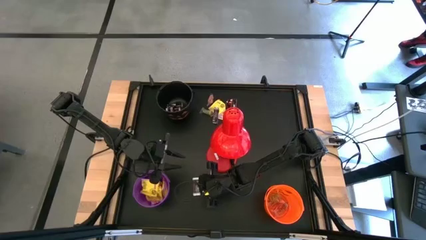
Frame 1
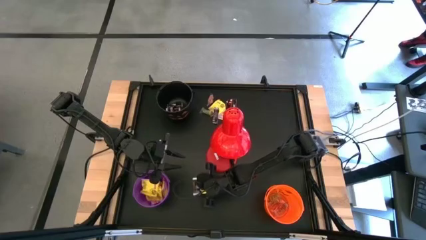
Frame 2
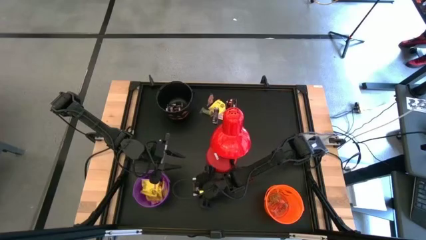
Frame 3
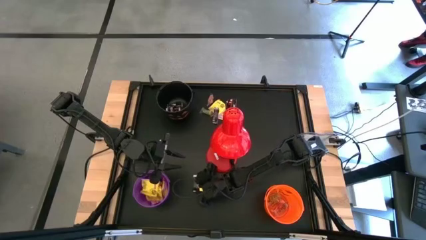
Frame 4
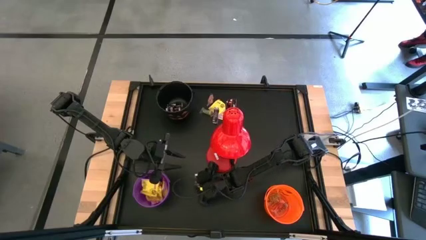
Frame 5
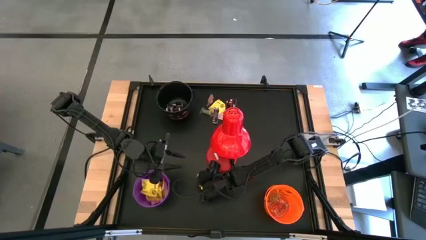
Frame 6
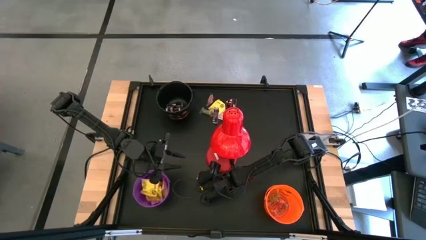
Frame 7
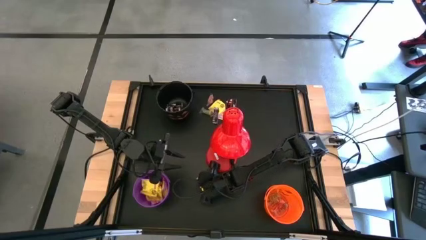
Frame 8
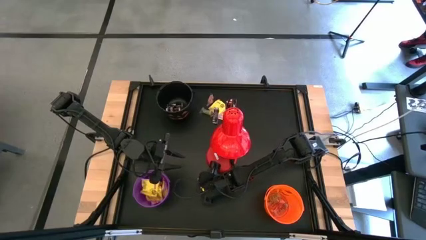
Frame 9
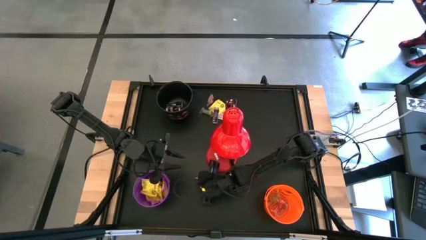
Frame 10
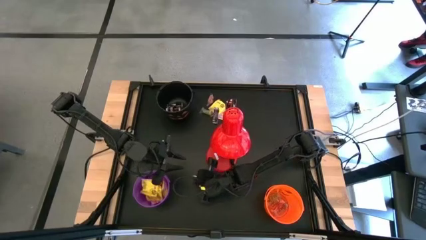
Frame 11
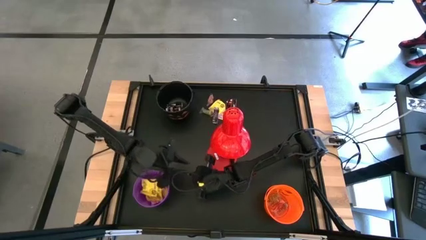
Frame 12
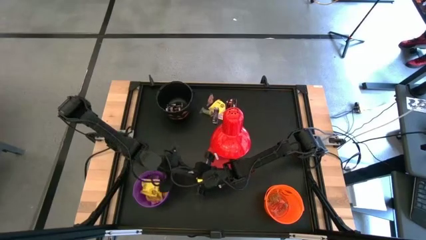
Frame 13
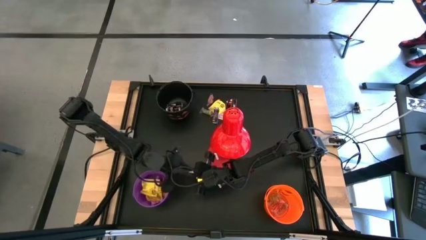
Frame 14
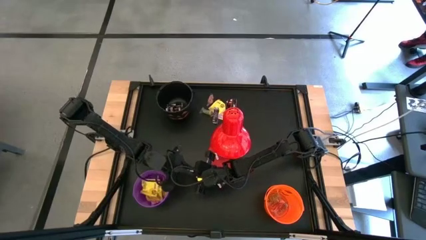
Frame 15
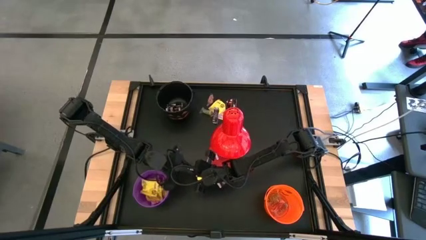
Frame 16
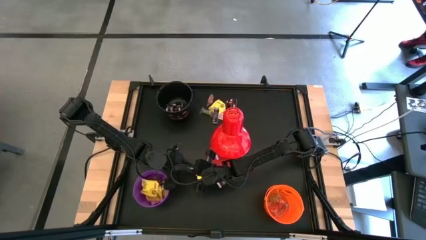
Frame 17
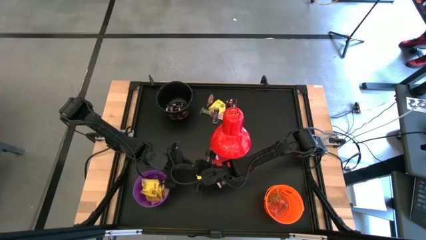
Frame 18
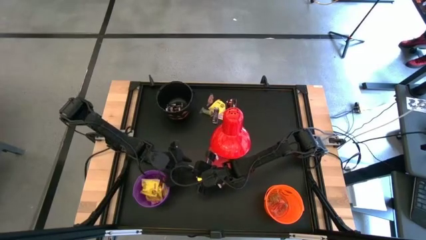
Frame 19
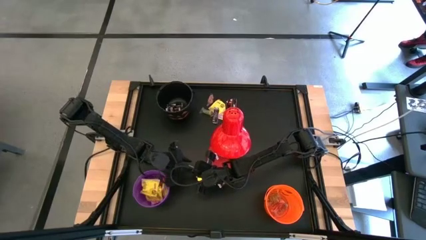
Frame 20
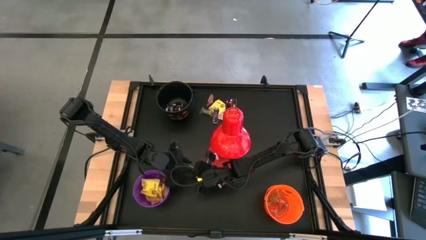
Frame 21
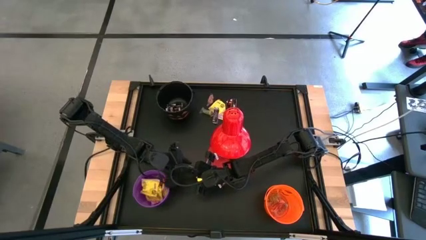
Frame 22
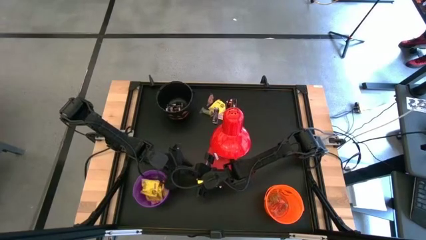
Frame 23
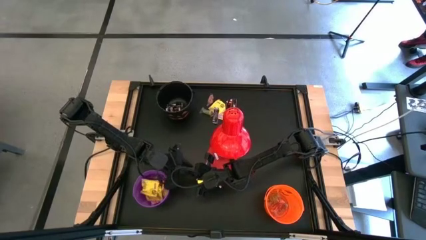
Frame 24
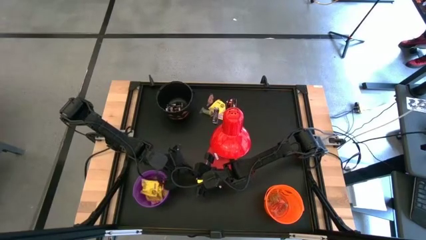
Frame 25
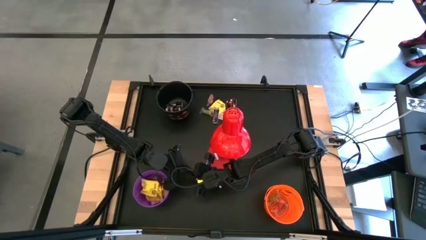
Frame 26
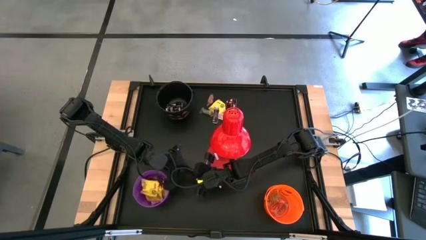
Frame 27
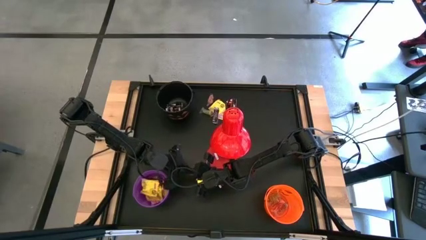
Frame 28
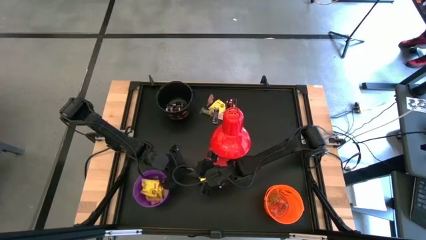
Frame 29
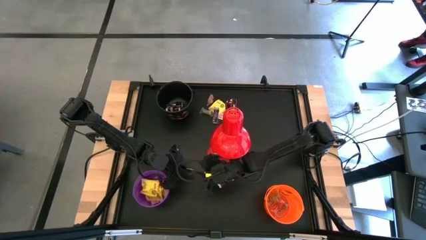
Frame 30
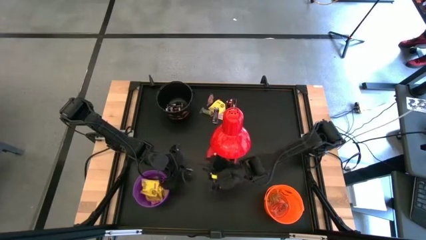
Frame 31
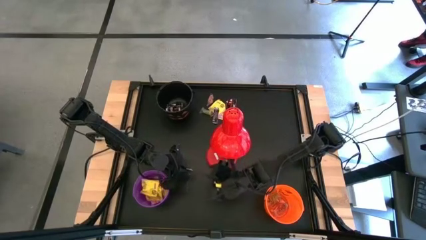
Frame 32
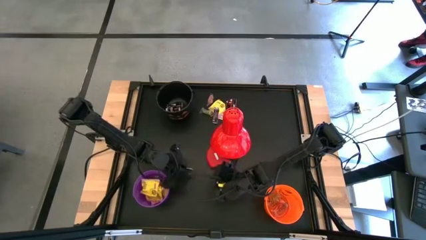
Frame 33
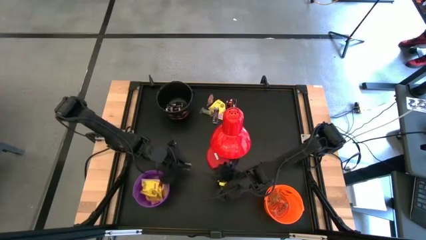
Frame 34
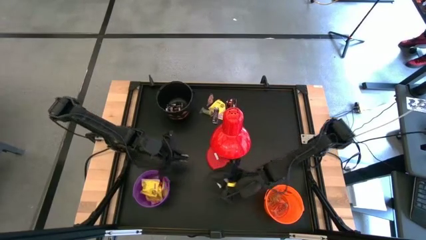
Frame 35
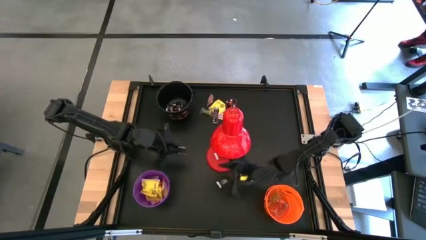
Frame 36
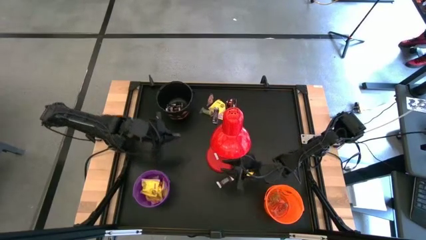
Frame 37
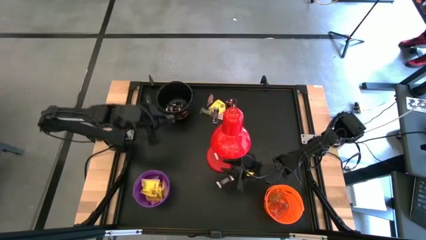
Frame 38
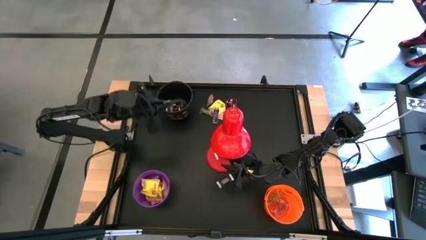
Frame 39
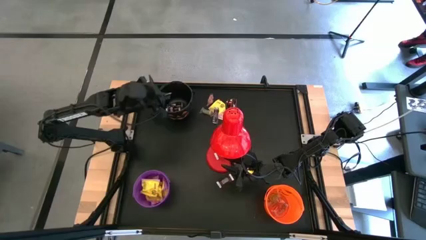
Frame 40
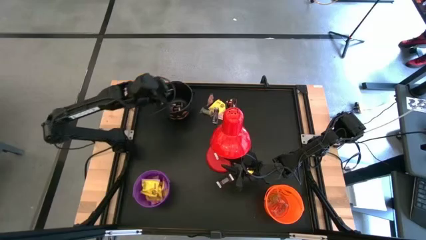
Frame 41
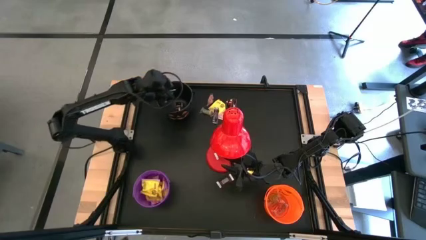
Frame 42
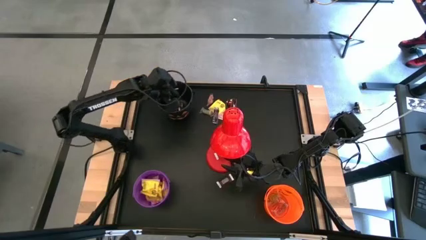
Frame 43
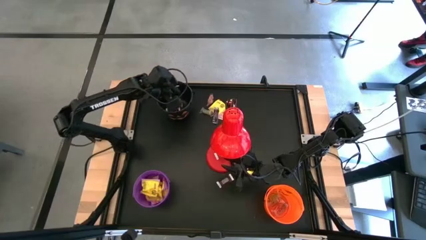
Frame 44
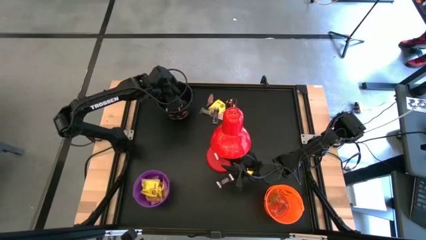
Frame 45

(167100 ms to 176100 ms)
Task: Organize candy in baskets
Put the brown chocolate bar into the black bucket
